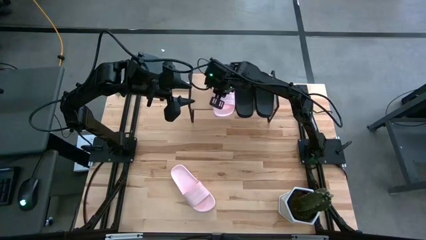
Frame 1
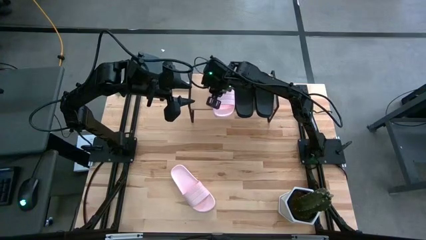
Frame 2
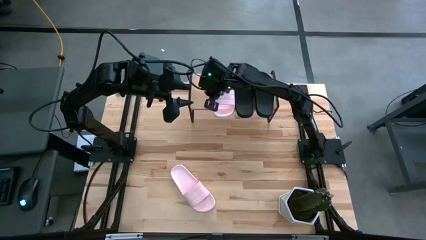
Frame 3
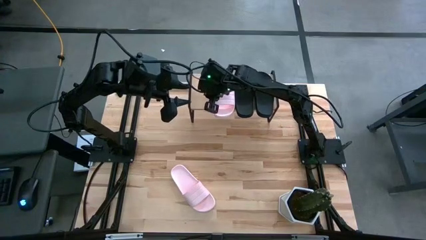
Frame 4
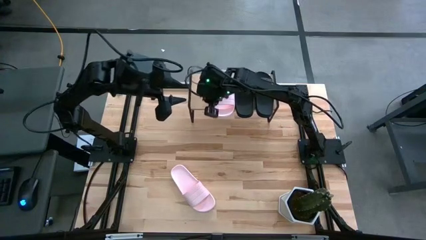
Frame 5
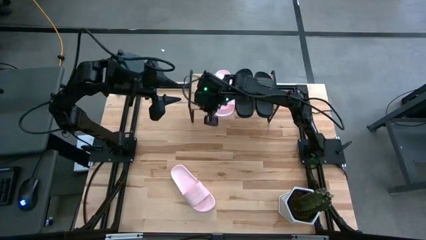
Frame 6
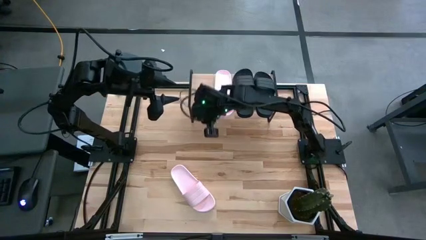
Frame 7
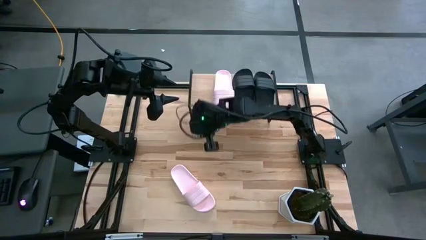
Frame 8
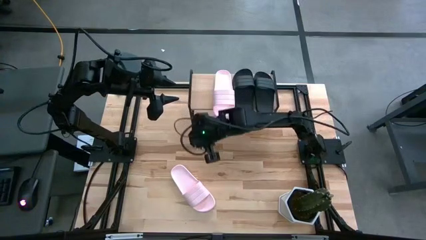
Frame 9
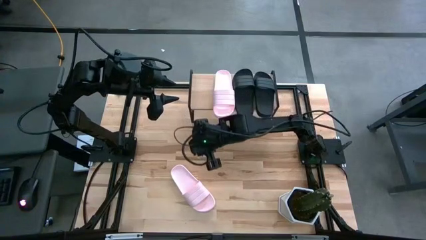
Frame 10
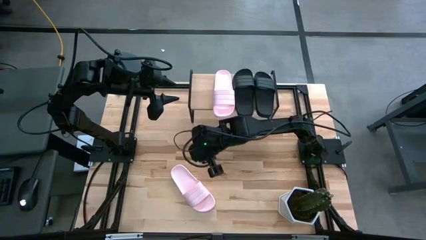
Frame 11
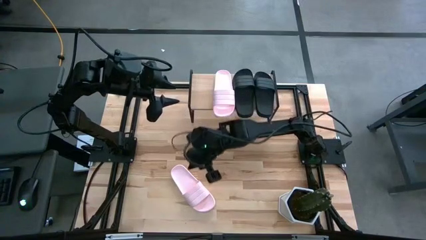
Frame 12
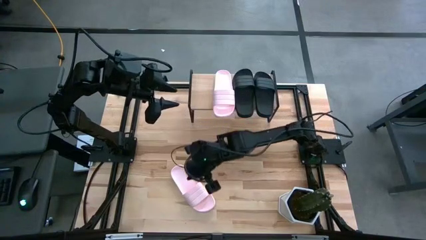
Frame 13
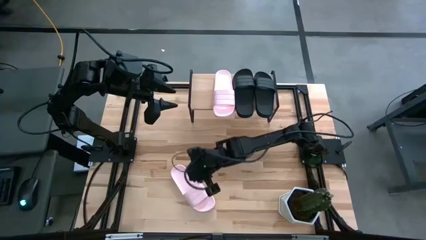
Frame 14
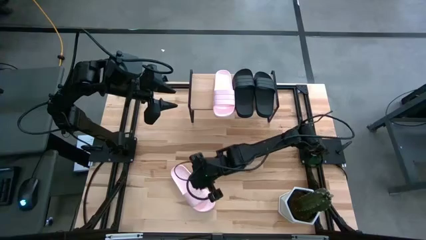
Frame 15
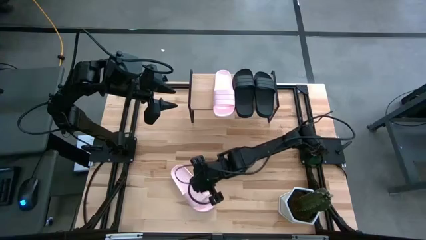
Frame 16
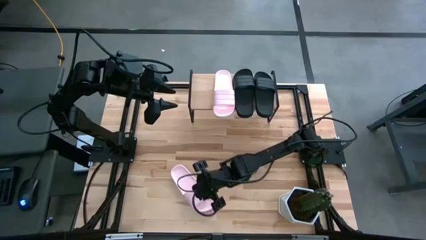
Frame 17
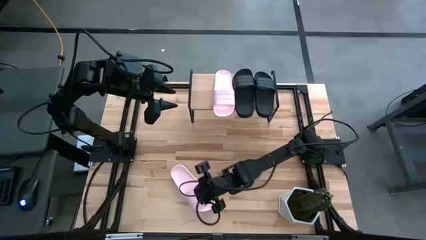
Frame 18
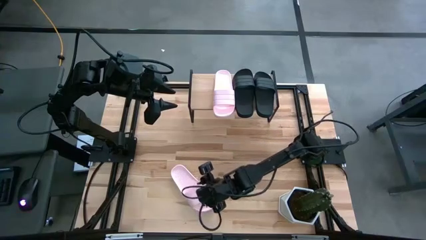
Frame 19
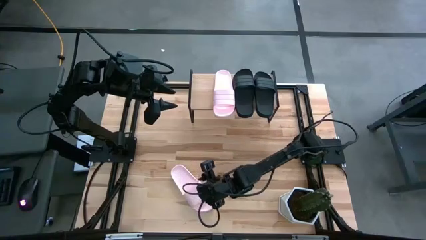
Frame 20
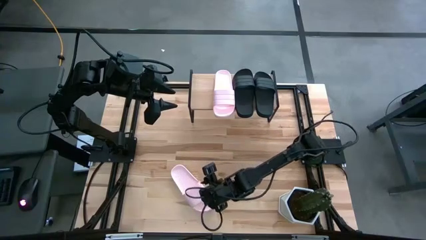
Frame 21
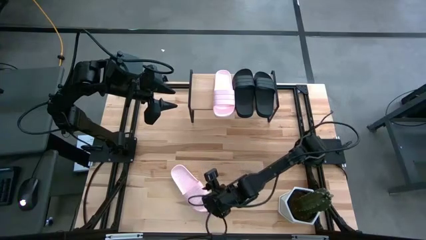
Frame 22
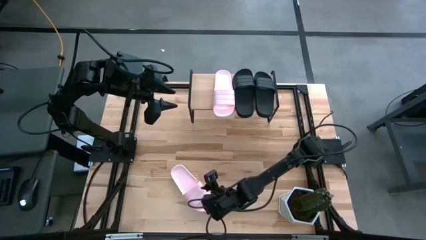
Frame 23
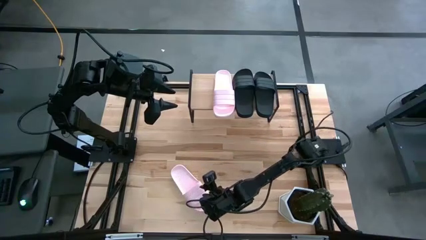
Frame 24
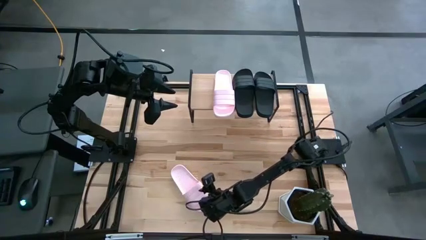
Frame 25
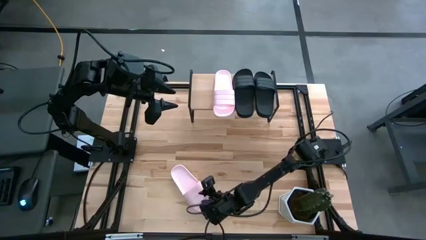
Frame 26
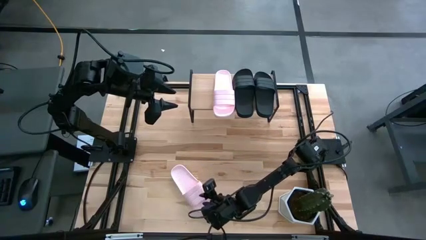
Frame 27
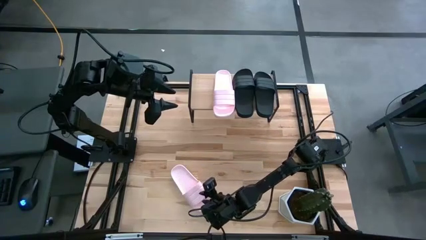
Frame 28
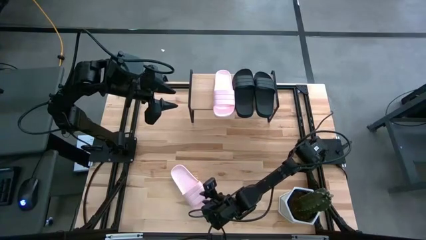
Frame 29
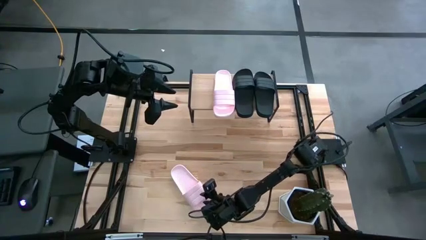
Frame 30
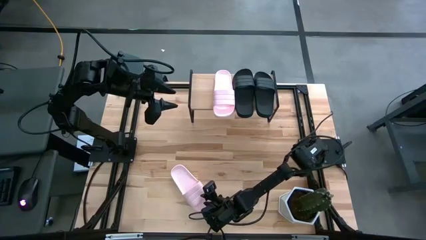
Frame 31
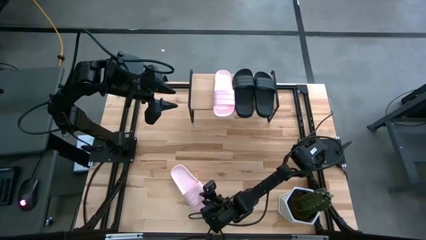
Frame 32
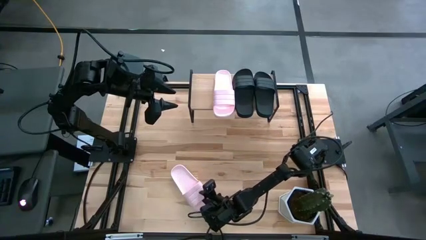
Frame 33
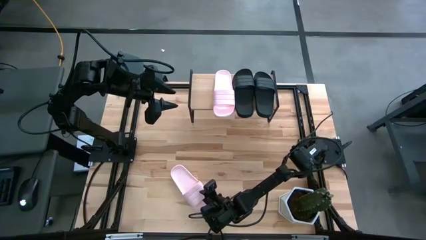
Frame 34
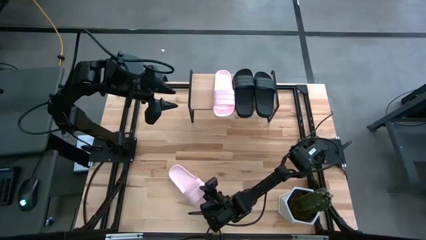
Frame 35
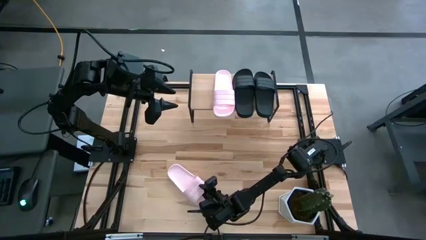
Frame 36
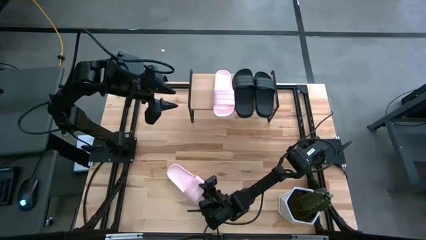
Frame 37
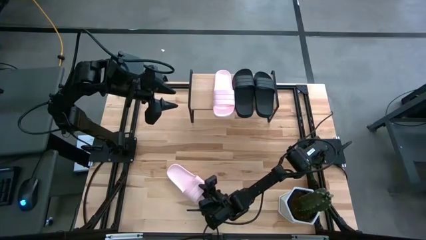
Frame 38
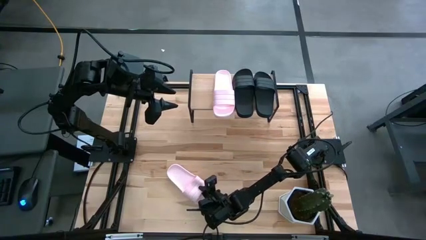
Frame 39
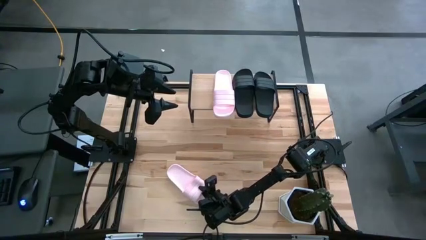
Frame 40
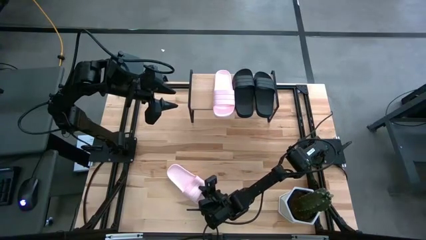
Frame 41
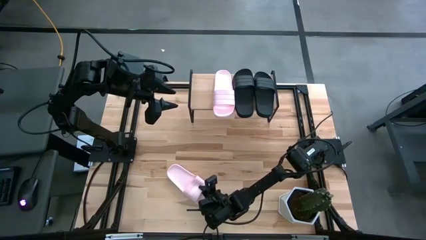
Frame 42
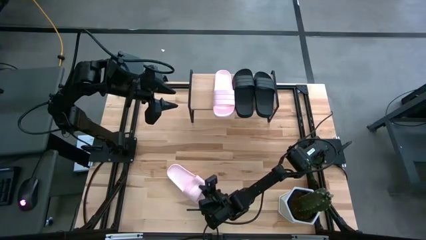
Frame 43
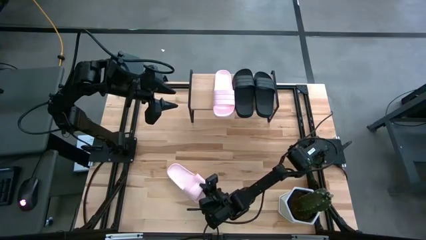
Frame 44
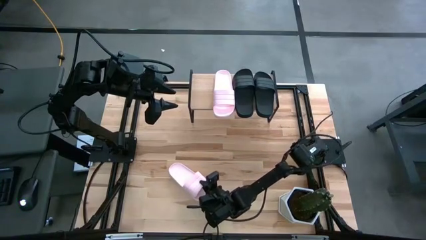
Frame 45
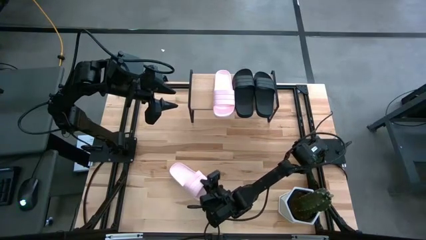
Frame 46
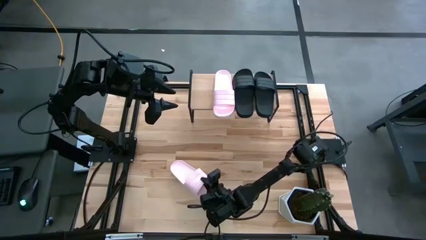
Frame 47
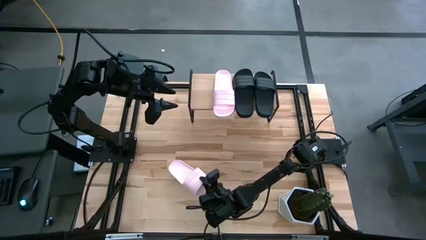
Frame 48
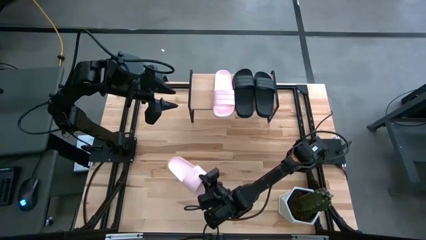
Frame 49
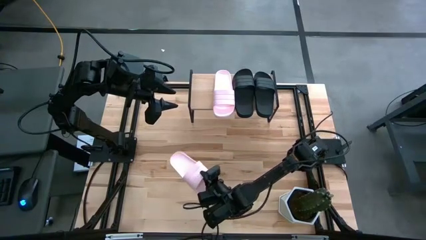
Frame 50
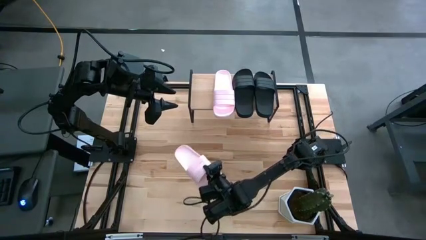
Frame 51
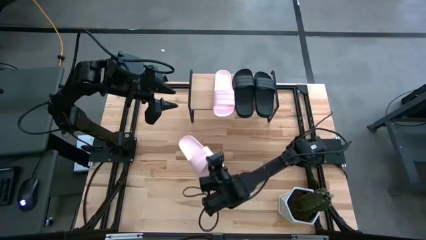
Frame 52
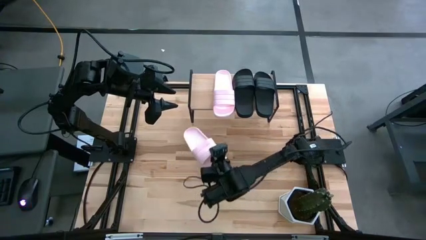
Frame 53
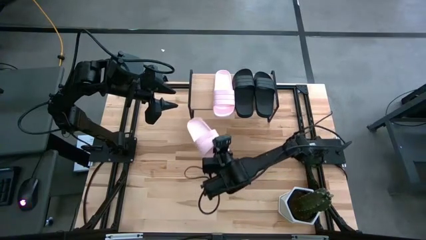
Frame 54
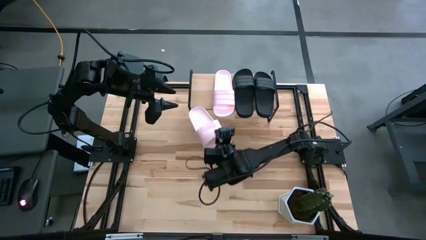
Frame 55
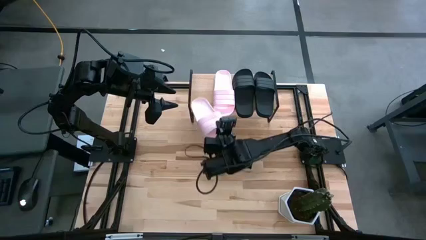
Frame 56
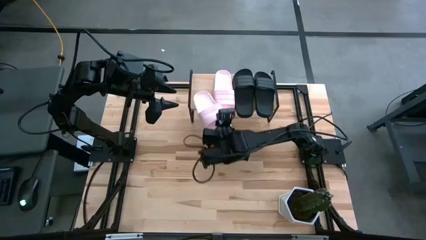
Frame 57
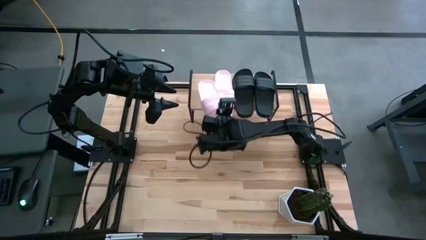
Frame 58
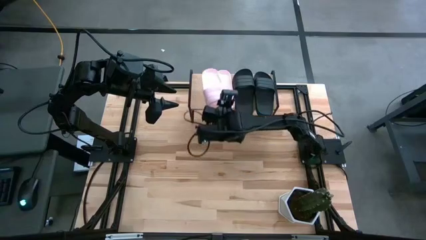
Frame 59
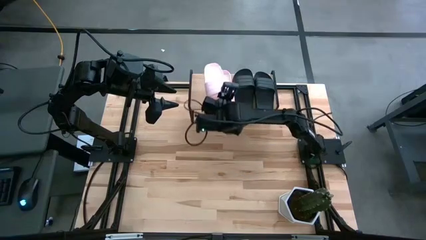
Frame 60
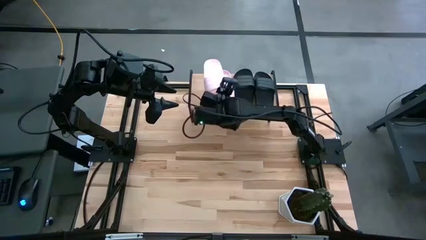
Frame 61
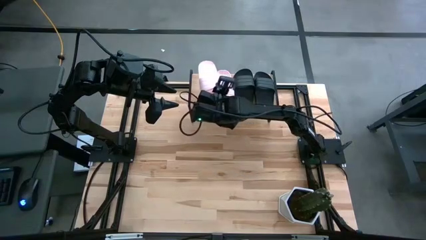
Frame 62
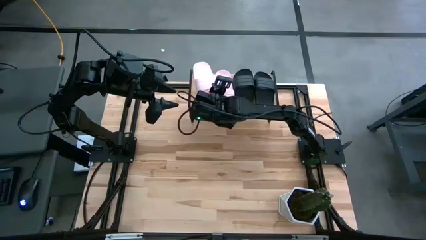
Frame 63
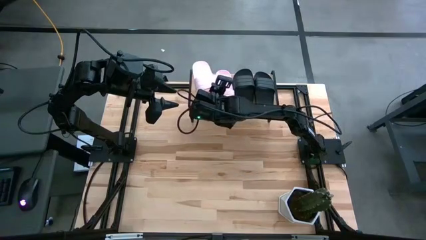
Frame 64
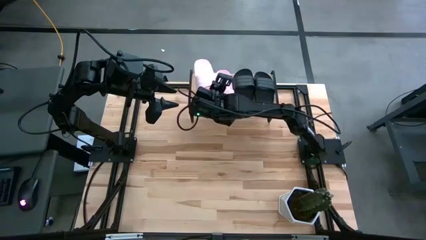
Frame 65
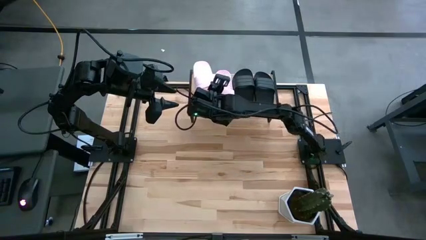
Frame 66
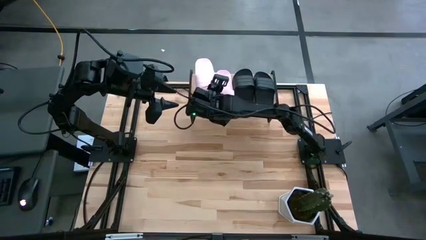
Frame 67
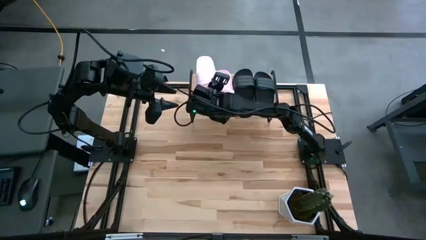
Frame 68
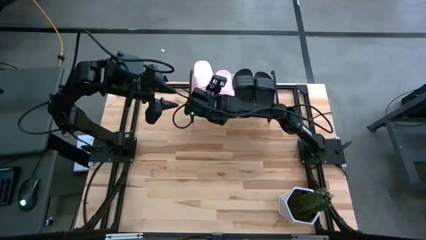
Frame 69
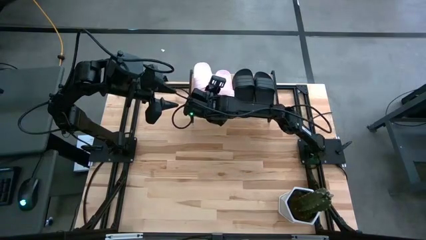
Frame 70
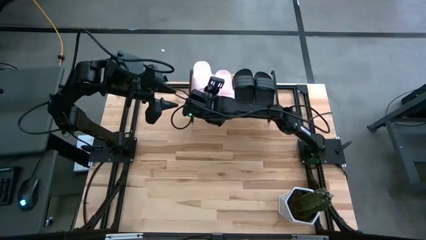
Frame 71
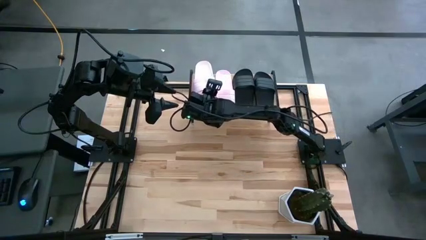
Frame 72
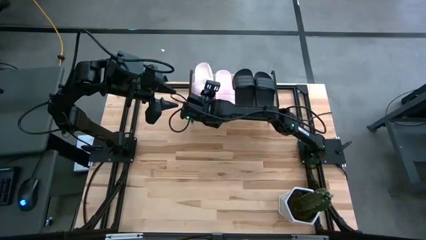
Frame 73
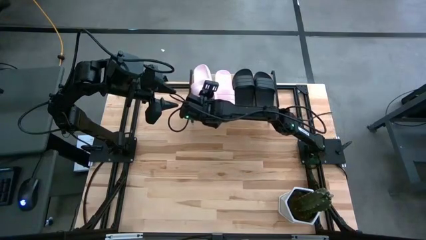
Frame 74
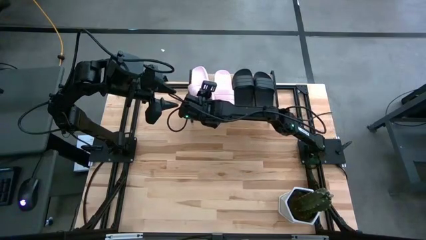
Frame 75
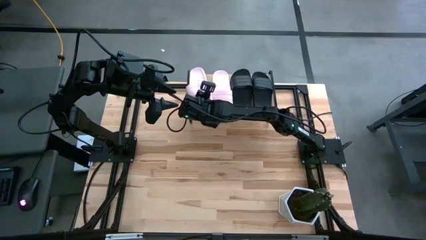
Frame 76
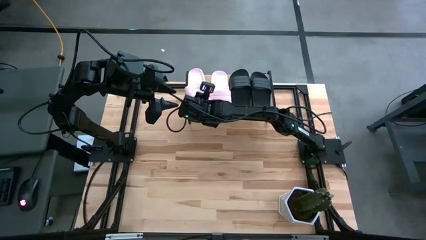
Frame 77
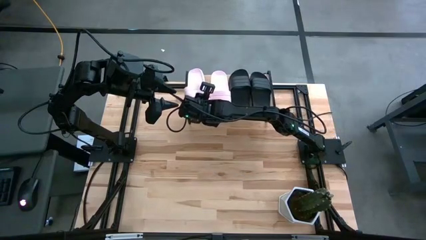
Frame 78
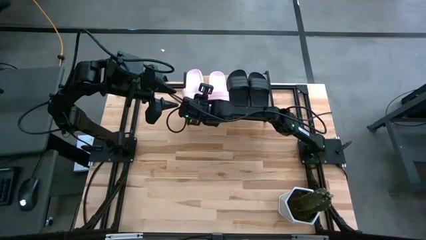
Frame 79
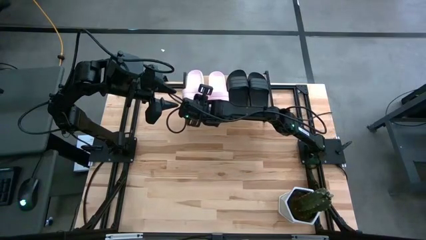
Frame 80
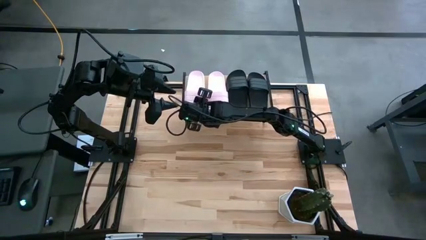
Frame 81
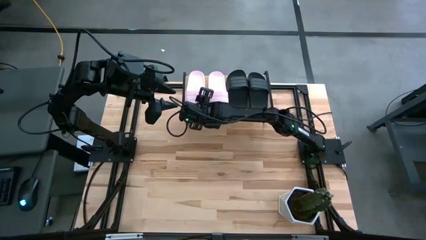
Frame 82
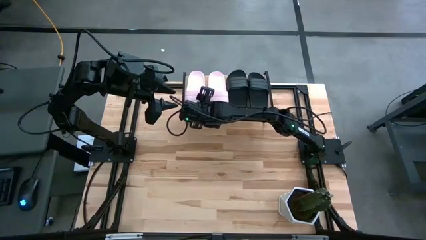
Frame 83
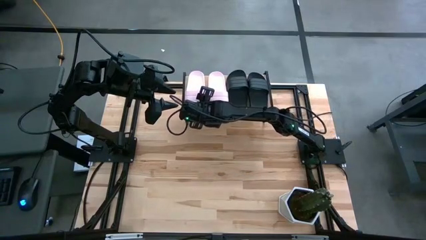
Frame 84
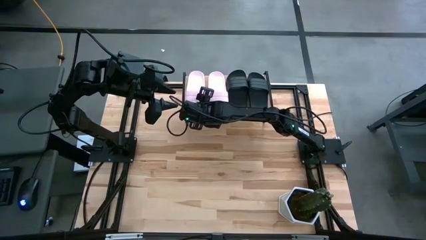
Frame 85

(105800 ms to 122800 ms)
Task: Pick and place slides into the shelf
Put the pink slipper on the shelf
